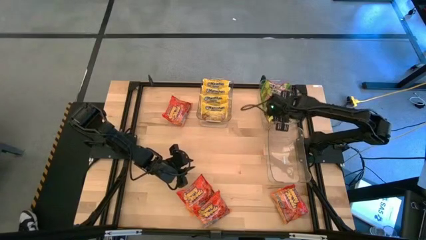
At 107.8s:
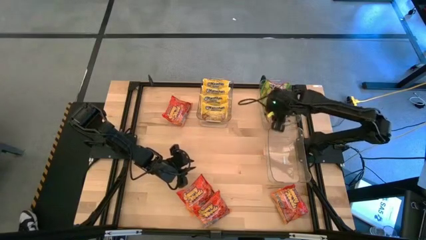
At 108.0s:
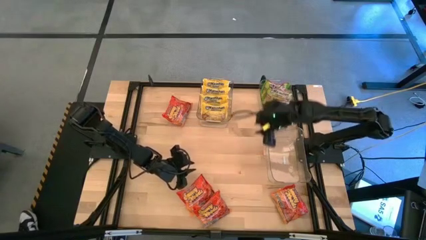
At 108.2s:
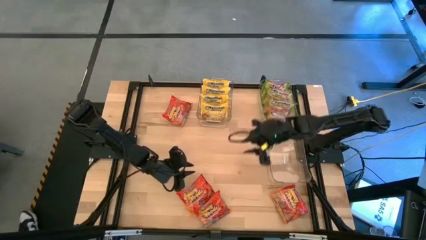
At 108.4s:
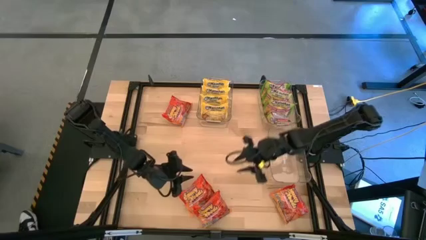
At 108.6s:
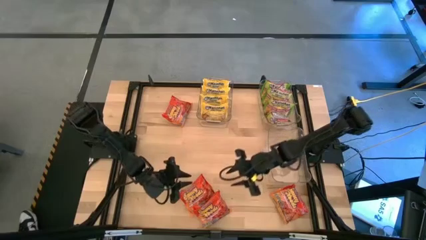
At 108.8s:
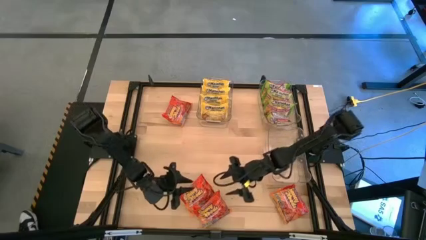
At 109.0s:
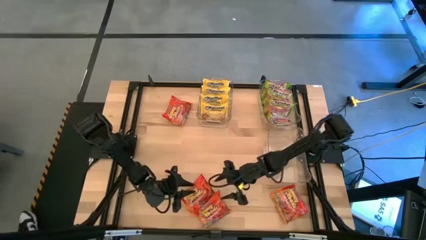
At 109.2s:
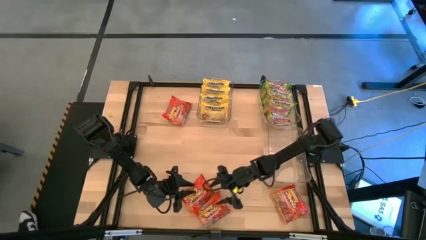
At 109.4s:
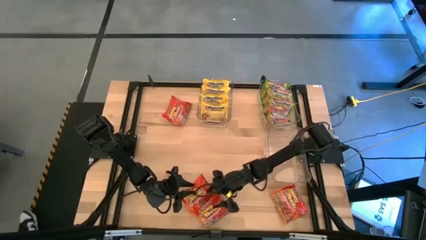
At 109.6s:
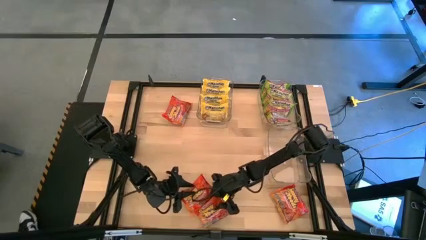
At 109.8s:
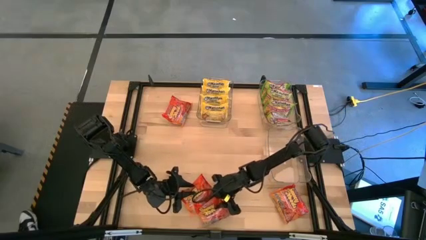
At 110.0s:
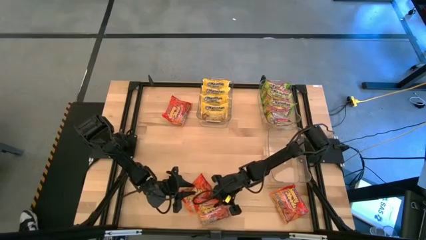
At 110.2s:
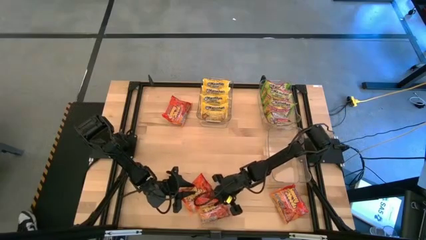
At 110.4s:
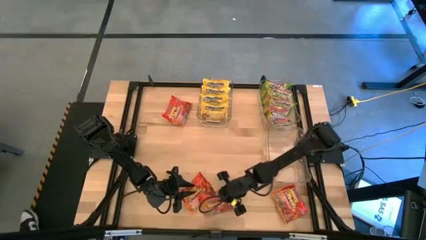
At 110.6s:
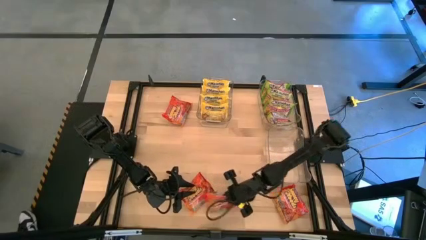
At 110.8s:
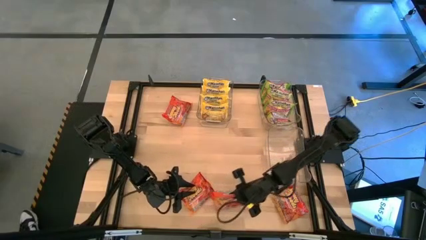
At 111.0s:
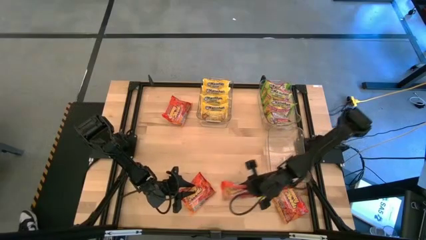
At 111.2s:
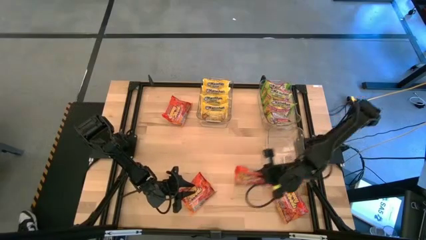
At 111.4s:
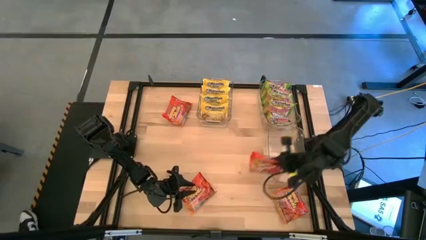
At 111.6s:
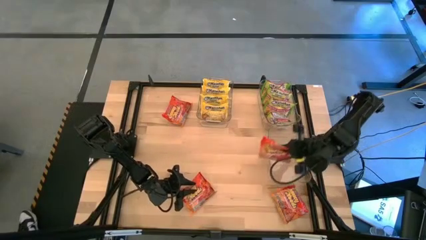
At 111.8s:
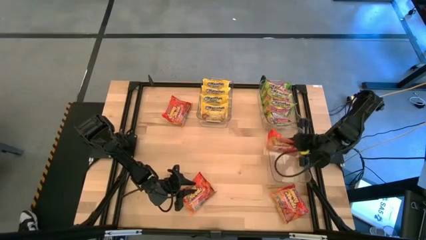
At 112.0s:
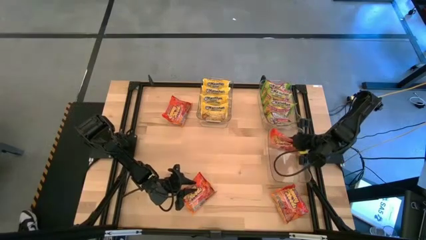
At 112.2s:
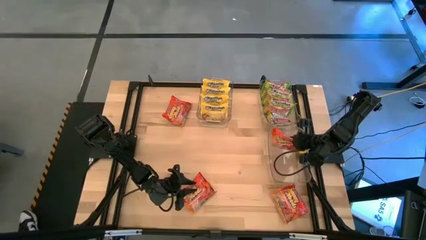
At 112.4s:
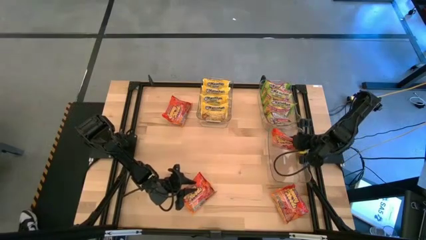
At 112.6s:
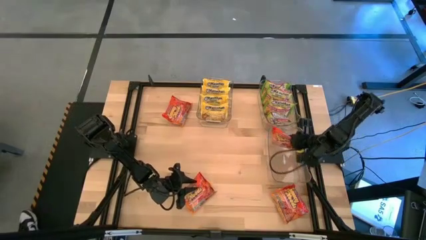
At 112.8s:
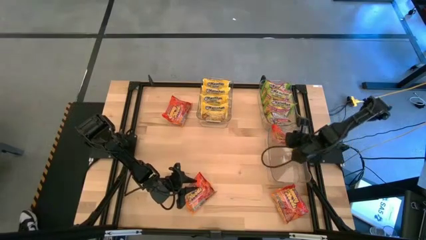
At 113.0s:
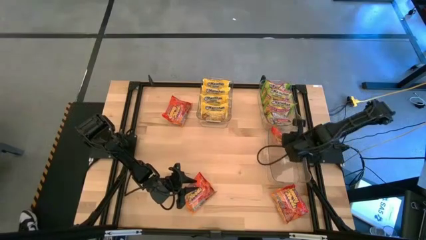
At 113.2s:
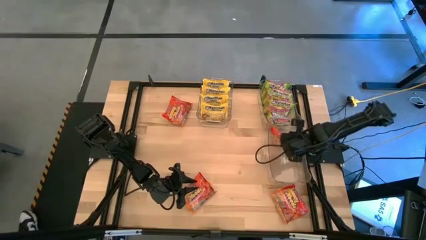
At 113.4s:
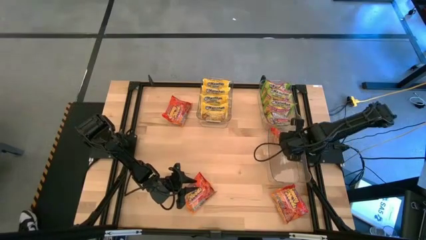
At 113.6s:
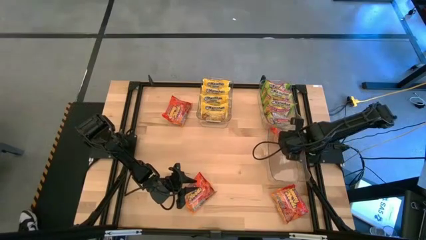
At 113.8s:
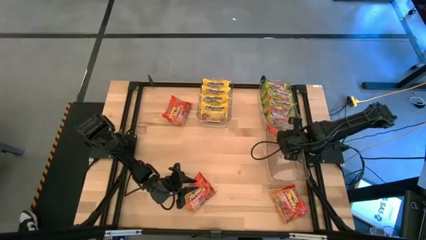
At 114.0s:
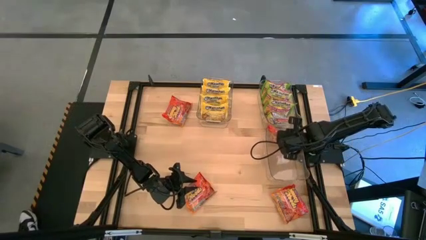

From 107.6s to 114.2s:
Task: Sort Maruchan noodles
Put the orange noodle pack into the bottom right transparent bin

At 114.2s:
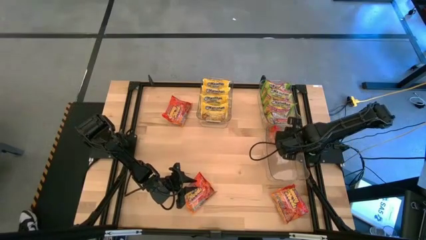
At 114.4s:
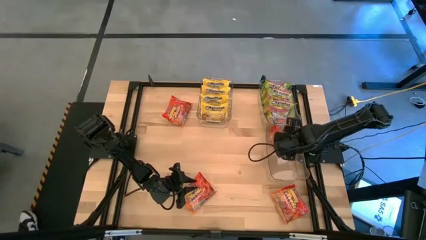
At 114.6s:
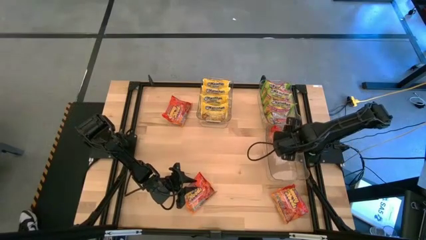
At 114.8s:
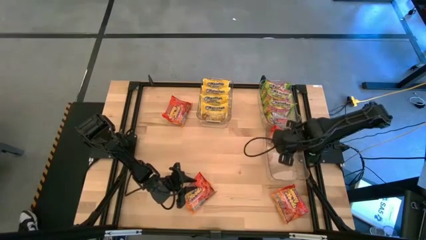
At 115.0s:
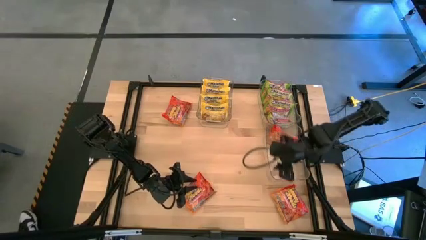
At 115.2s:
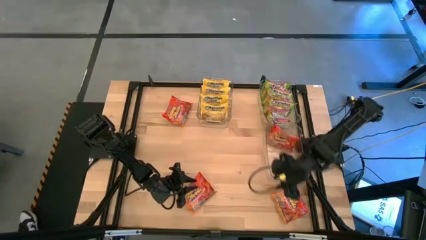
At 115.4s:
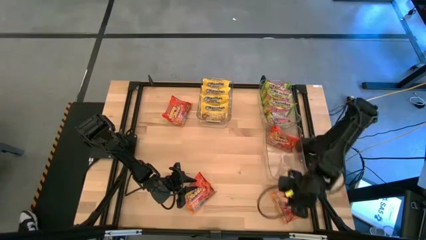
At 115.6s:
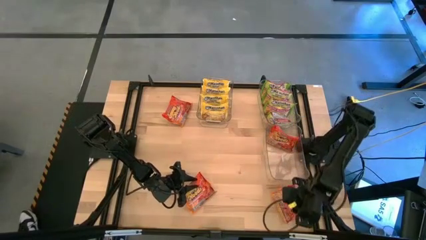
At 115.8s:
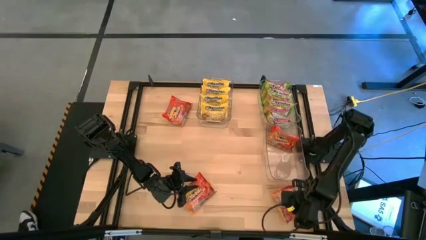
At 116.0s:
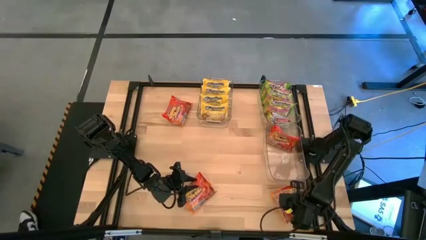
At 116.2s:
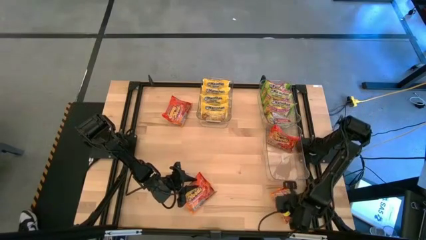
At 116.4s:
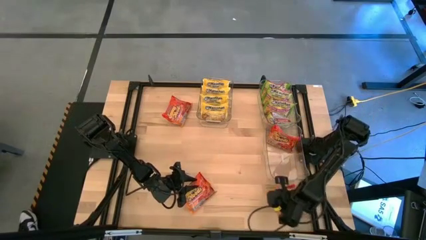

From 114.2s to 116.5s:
Put the orange noodle pack into the bottom right transparent bin

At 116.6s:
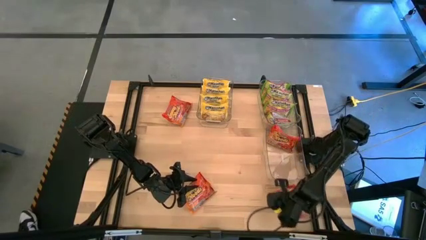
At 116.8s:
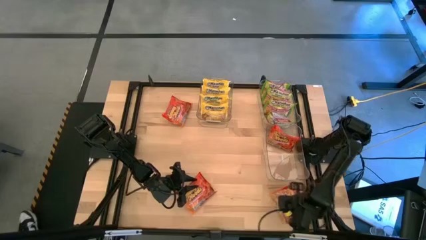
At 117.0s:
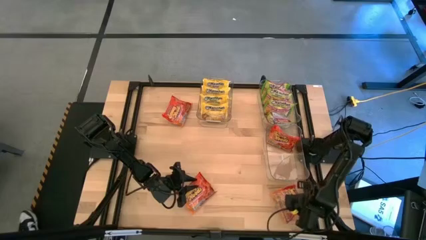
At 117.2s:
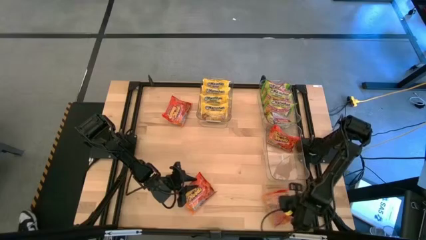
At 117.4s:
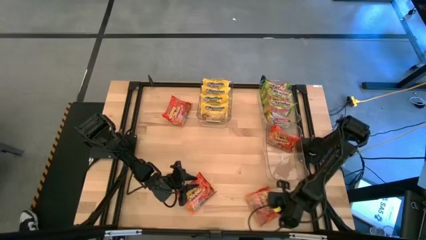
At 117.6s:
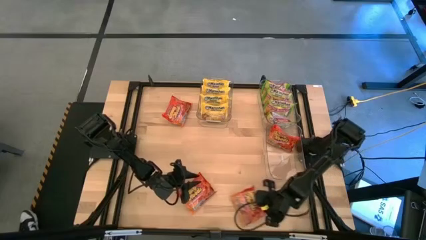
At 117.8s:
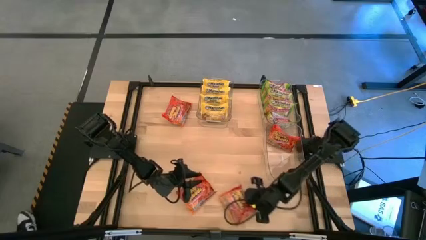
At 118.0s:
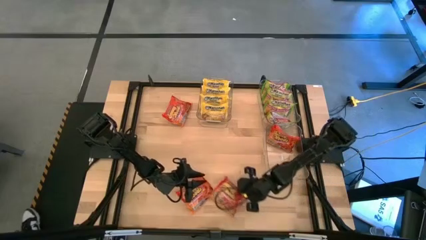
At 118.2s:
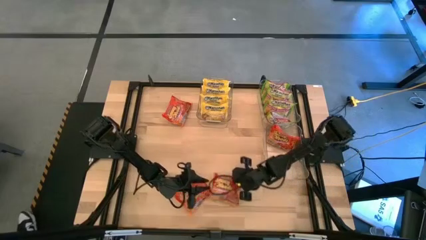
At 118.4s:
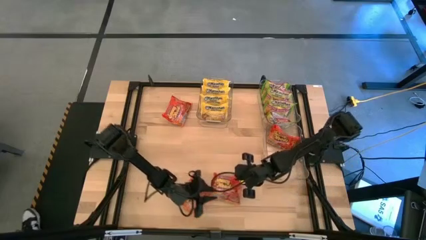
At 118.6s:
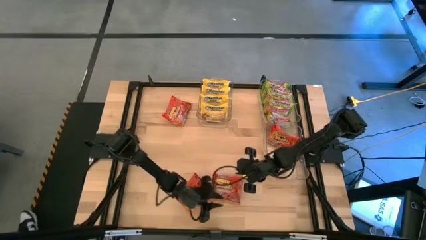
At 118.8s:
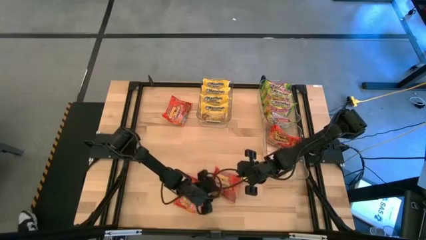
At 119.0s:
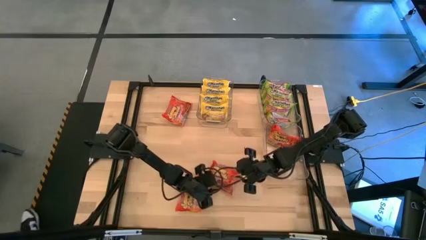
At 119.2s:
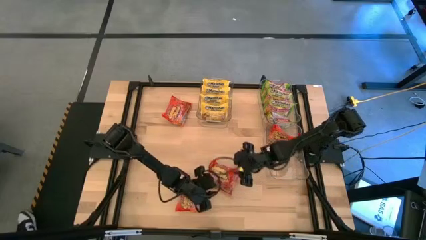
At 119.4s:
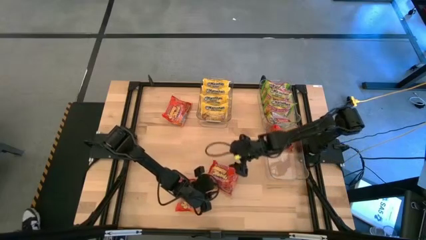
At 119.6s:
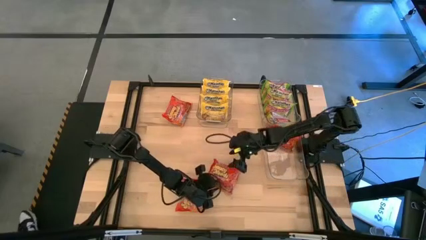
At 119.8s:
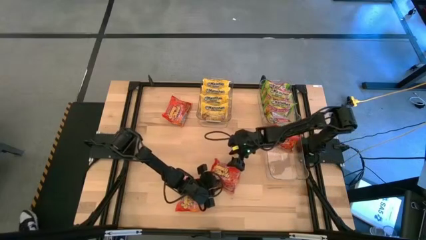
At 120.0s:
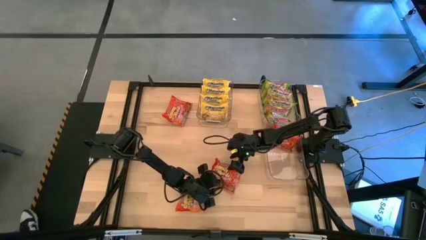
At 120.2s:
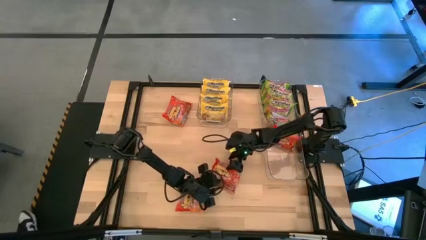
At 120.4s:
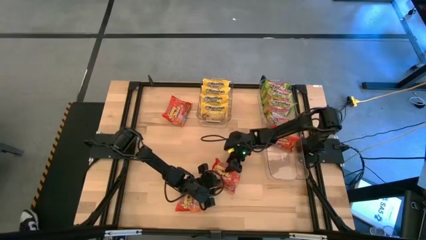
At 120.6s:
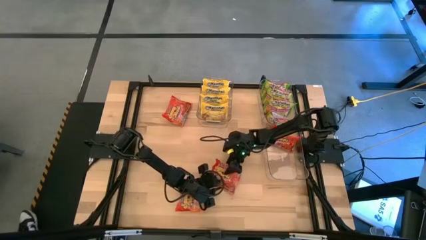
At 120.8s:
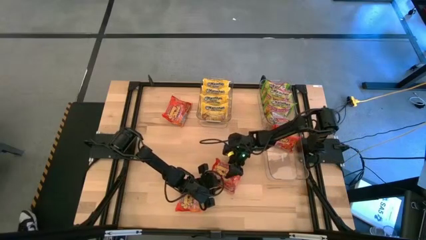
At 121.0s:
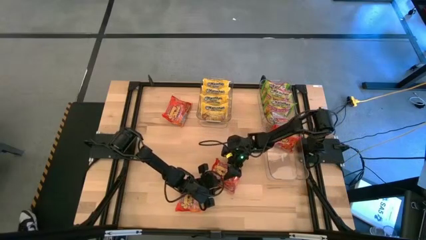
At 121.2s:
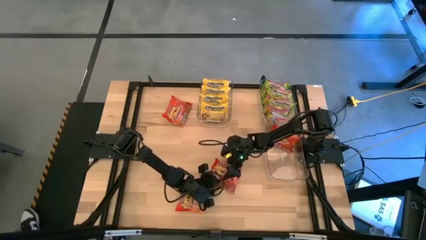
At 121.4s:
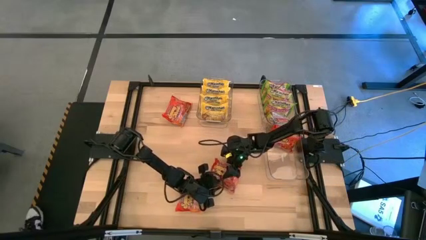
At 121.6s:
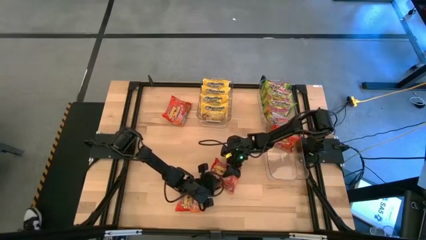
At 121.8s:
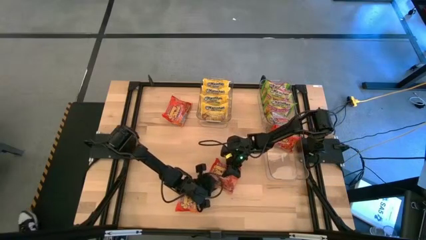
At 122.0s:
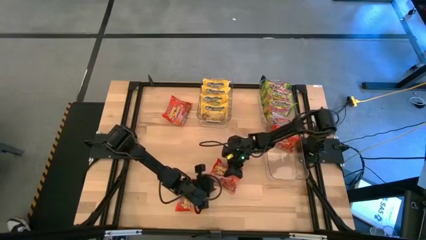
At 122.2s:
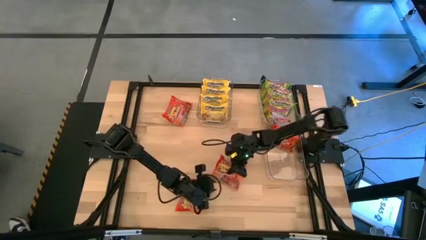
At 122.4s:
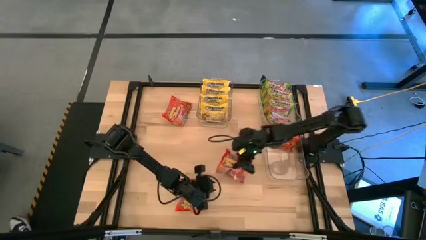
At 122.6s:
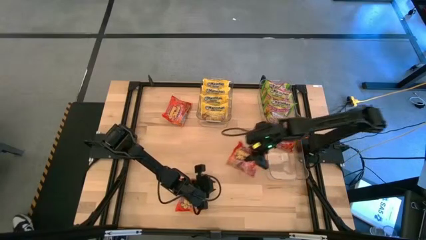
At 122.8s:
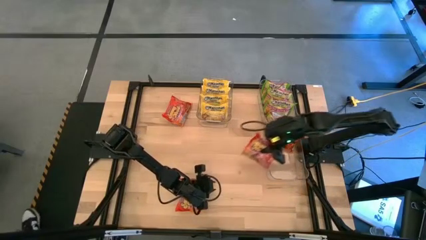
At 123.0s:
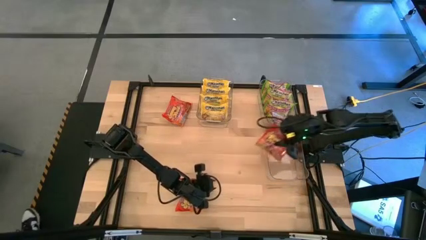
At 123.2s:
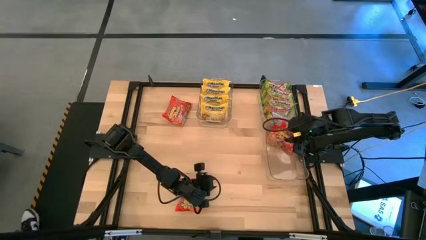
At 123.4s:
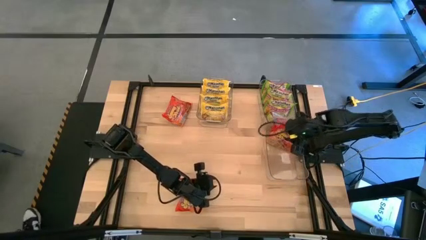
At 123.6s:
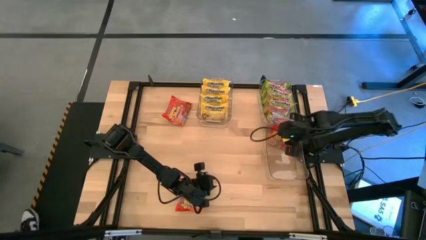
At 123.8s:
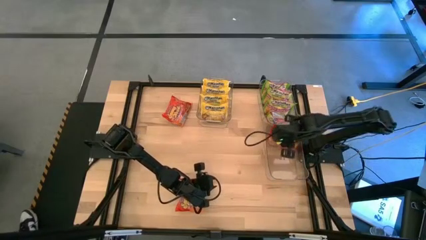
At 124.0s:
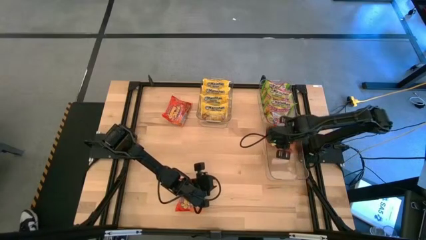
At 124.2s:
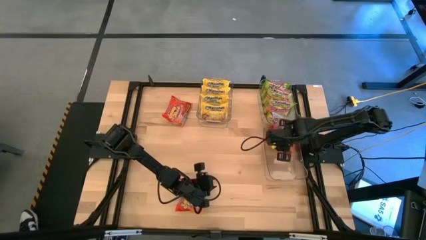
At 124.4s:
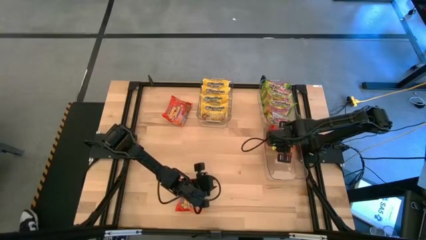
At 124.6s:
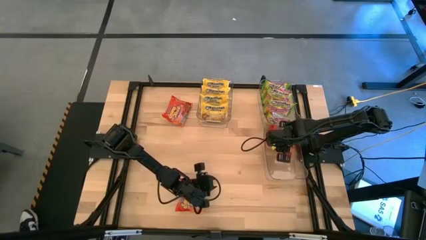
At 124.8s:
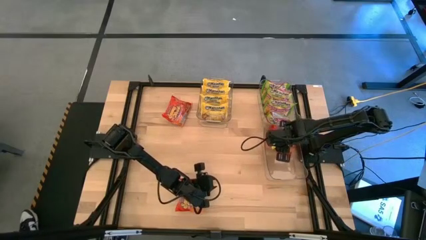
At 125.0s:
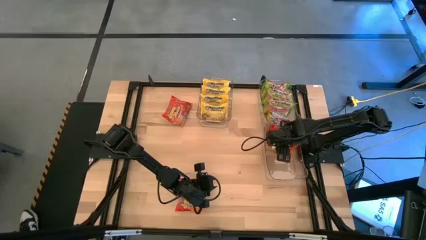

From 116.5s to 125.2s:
Put the orange noodle pack into the bottom right transparent bin
